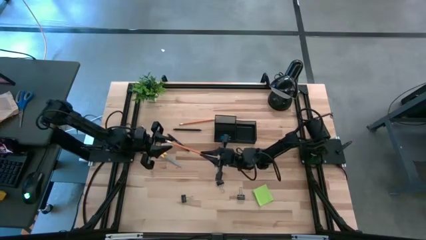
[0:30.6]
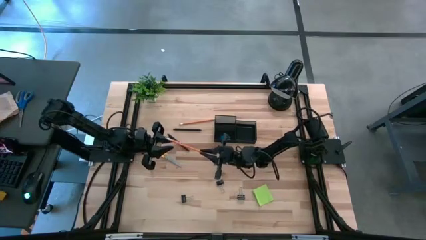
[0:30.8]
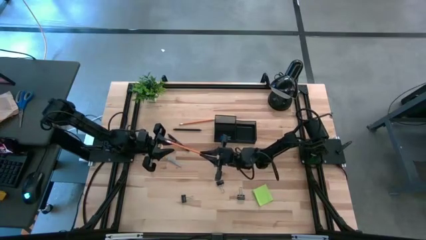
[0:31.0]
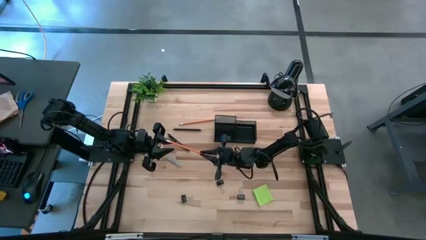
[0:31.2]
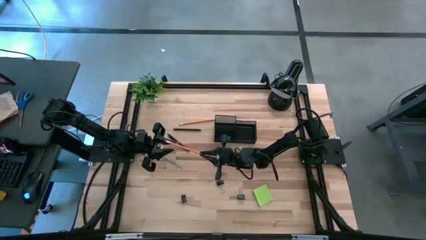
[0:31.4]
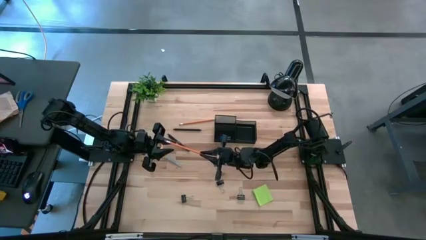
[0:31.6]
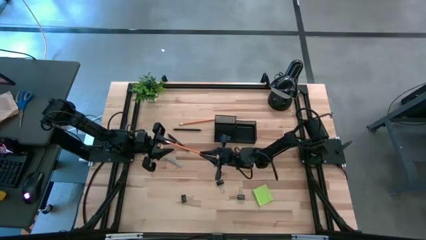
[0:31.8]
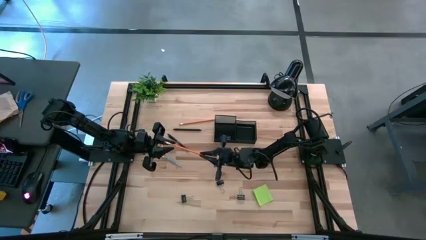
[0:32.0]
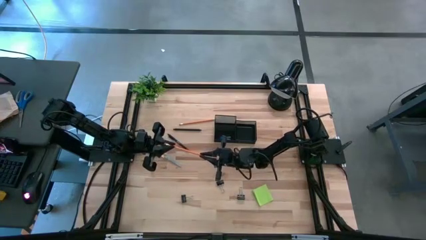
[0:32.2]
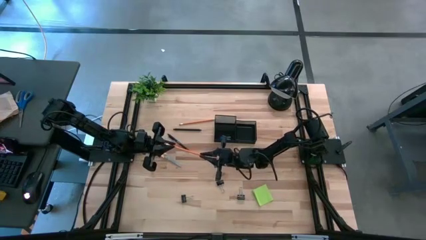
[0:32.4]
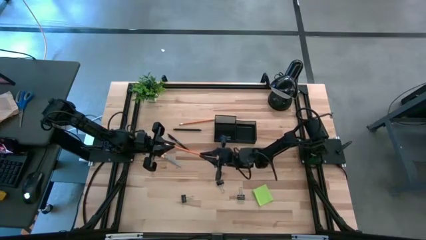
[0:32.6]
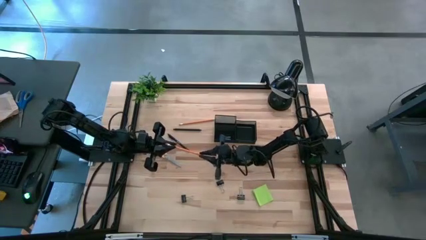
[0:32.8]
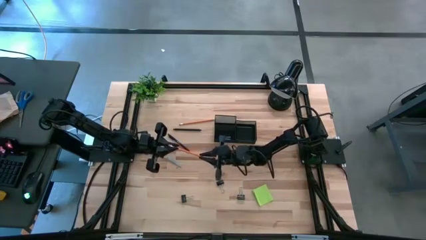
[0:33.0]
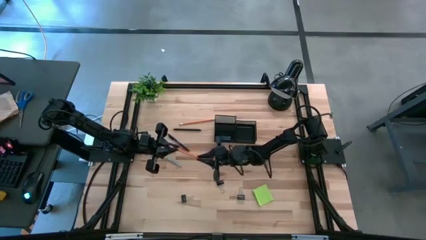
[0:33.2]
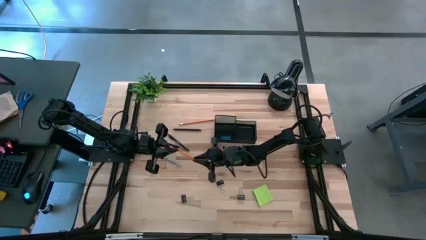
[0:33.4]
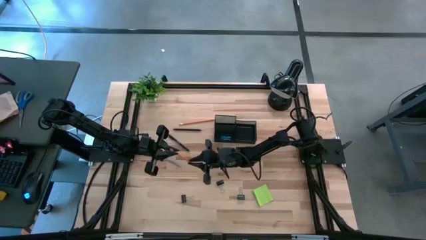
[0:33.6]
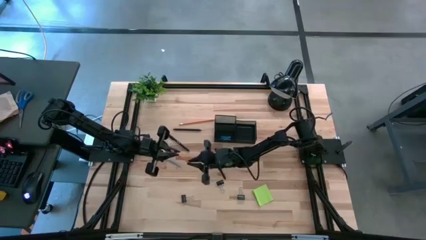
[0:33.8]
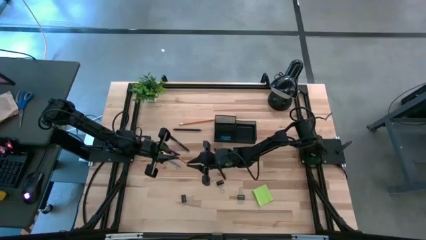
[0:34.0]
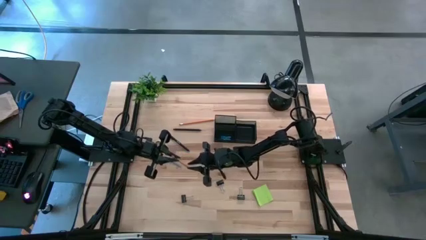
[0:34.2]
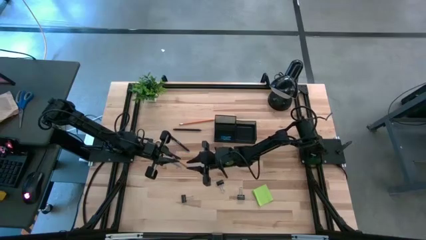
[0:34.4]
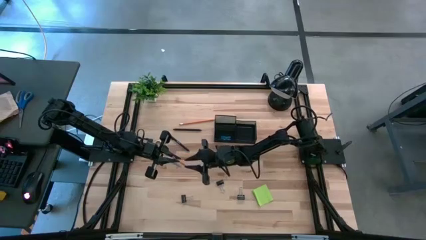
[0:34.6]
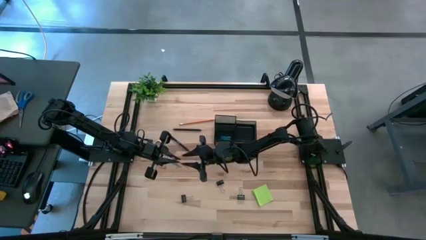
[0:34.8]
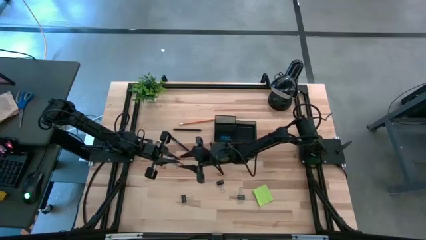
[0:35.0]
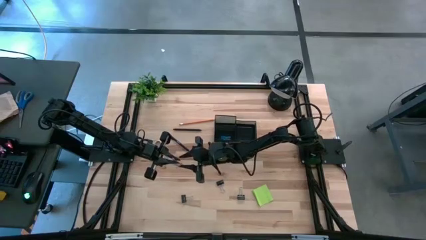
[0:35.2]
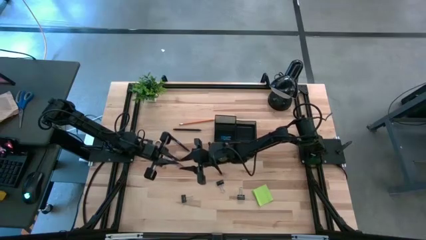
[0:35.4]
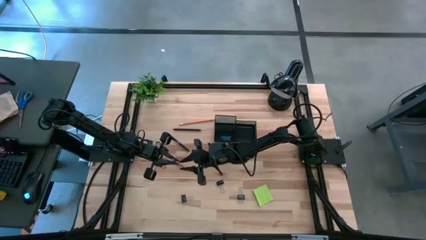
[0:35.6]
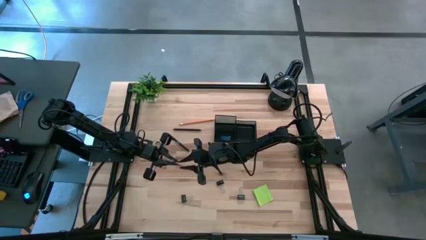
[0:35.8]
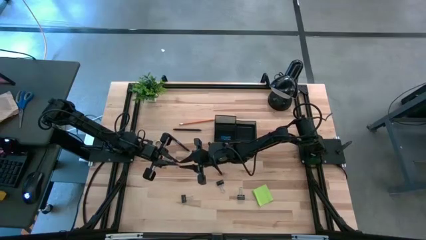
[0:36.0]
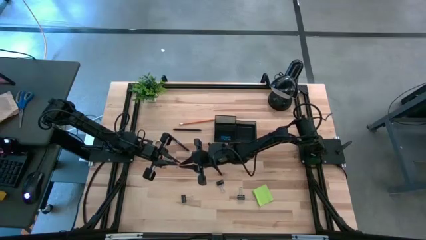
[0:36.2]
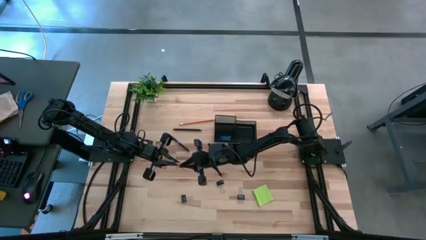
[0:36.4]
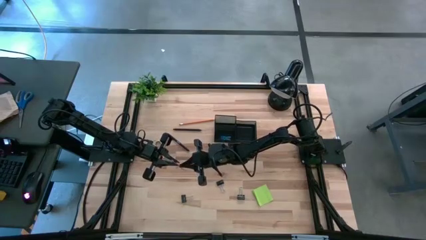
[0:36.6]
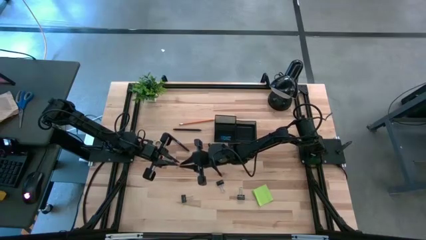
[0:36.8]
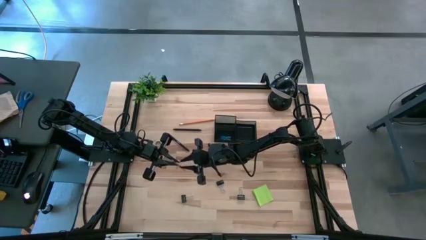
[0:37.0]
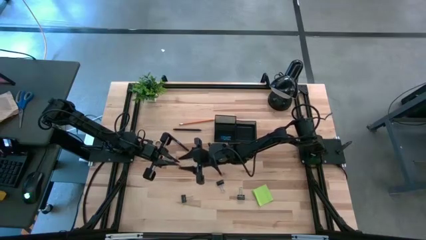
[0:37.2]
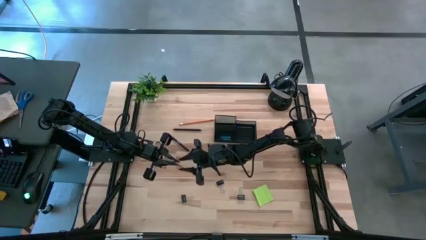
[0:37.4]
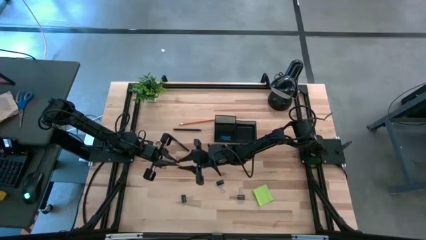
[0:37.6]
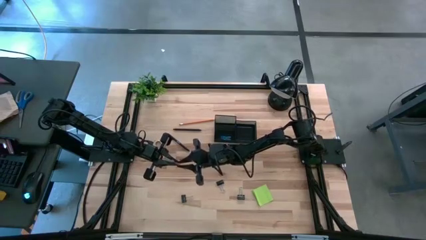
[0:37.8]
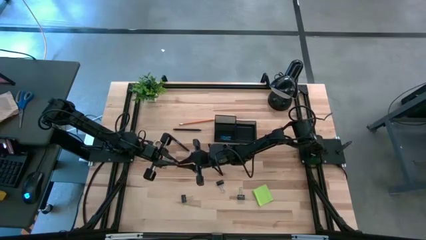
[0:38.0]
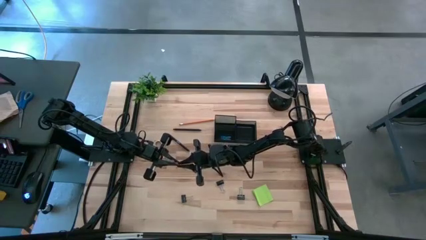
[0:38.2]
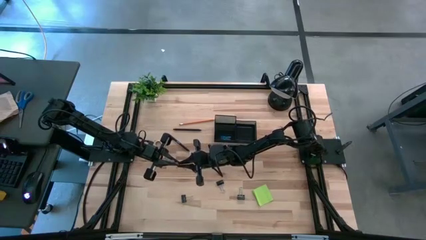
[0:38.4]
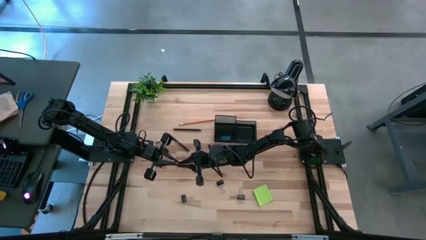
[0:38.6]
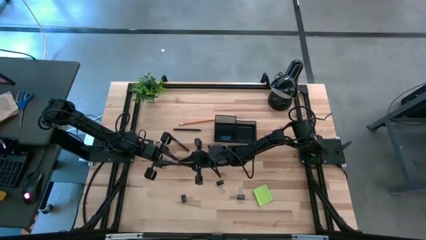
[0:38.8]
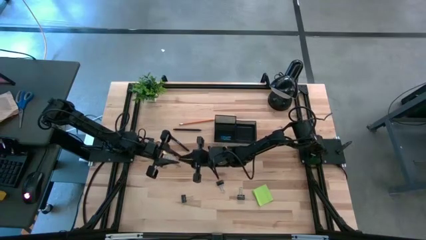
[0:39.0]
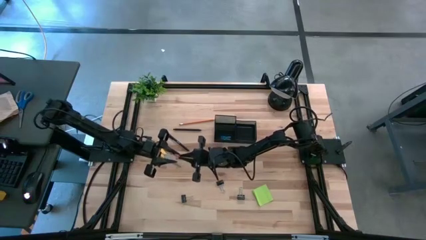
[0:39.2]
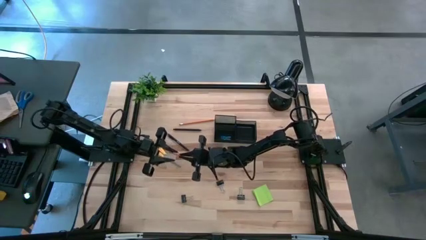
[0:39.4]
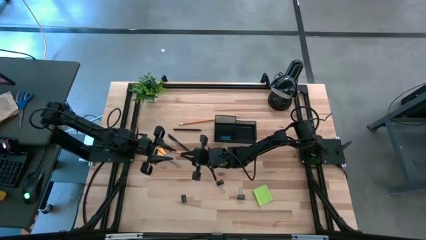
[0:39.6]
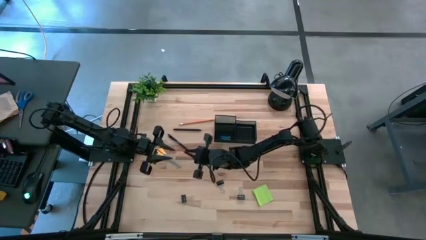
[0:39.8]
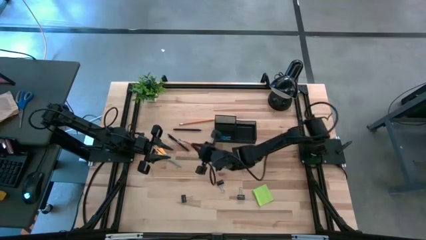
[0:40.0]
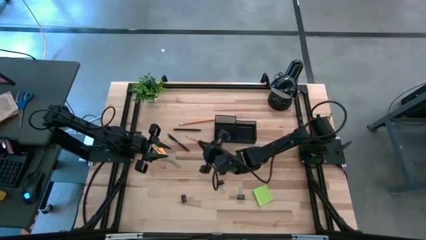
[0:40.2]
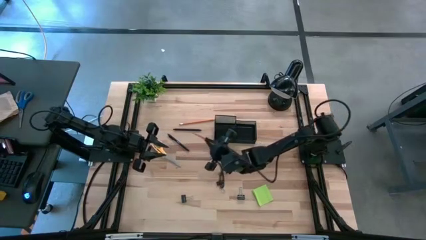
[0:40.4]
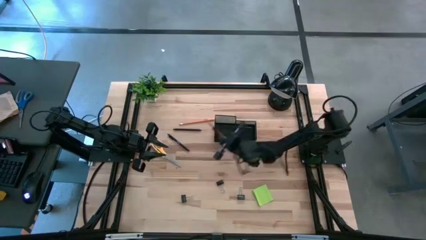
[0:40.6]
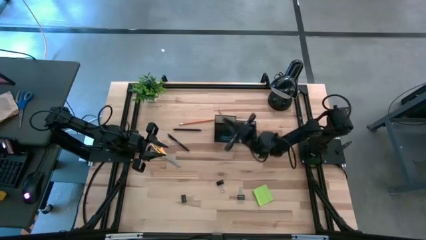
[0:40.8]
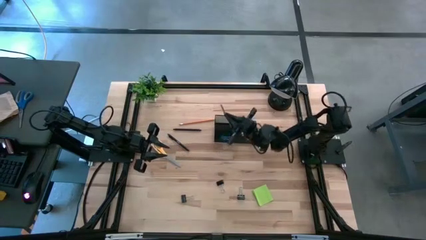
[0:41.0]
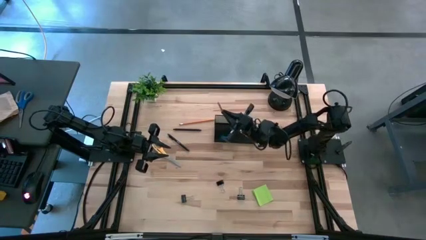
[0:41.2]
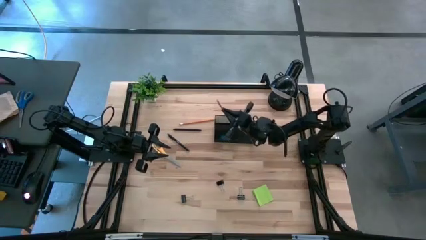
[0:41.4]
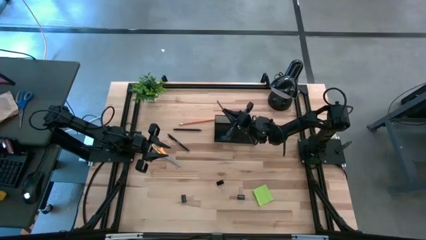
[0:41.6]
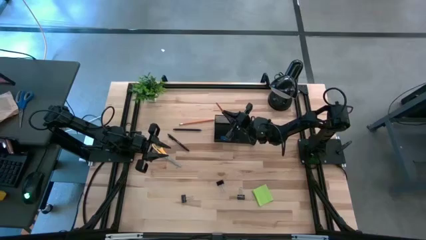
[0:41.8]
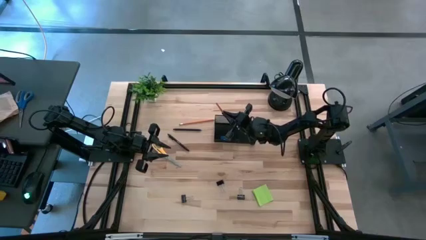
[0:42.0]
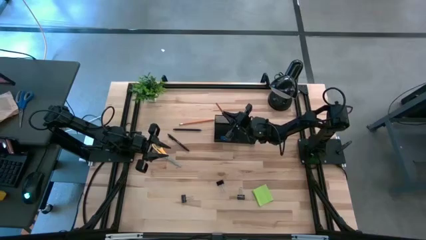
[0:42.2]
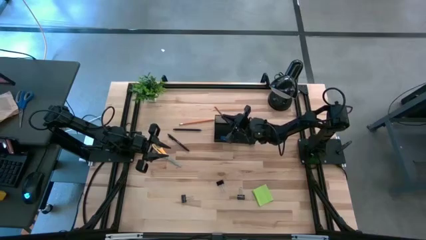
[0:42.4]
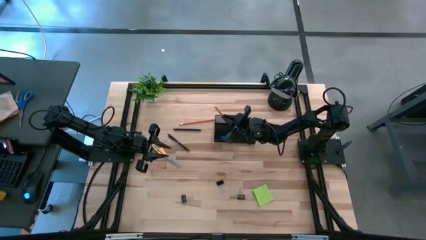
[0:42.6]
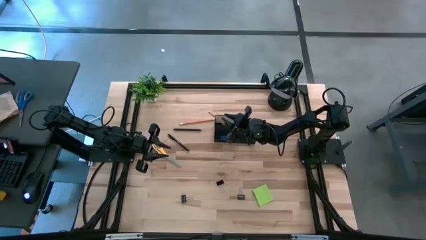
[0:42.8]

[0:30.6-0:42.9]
Task: Pick and place office supplies into organizer
Put the orange pencil into the desk organizer

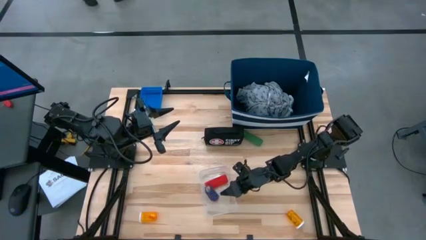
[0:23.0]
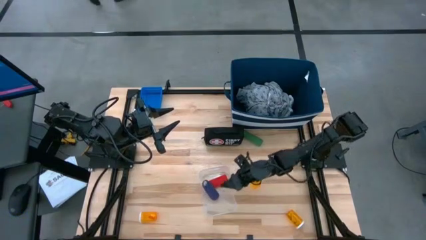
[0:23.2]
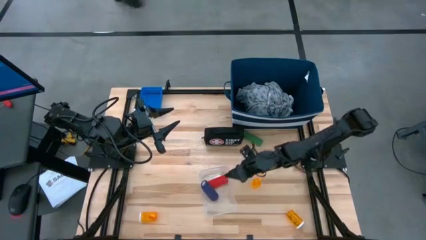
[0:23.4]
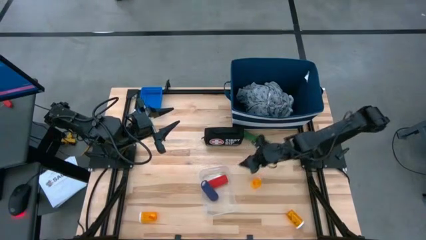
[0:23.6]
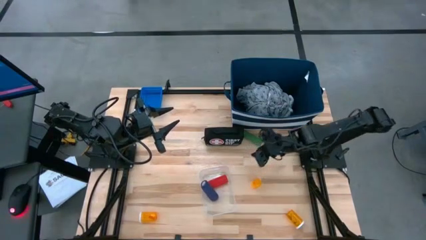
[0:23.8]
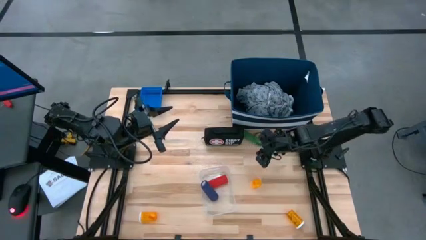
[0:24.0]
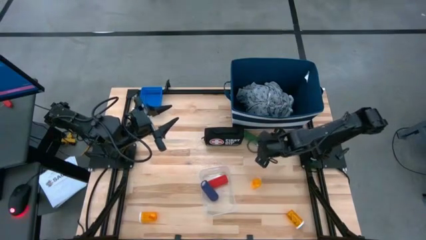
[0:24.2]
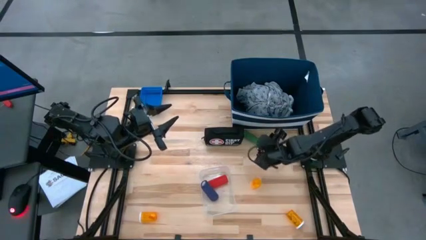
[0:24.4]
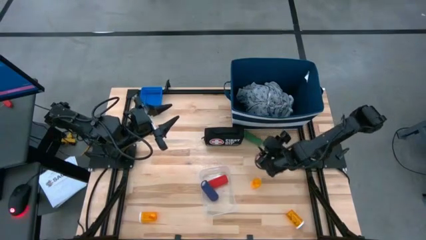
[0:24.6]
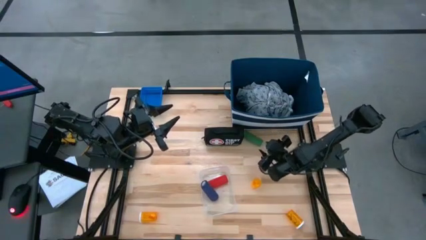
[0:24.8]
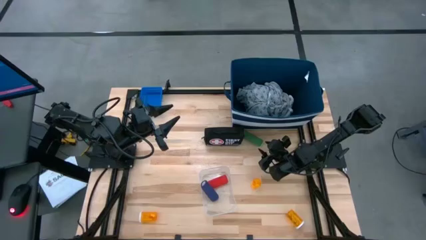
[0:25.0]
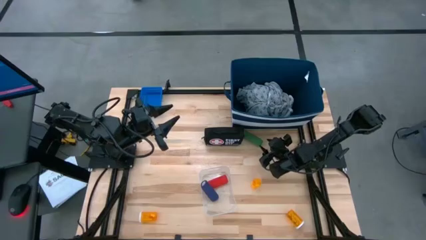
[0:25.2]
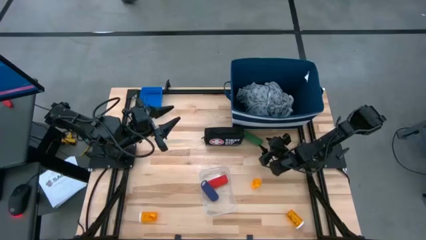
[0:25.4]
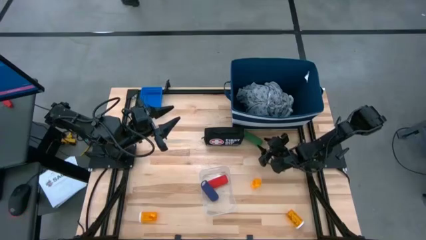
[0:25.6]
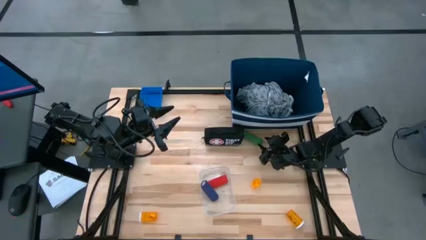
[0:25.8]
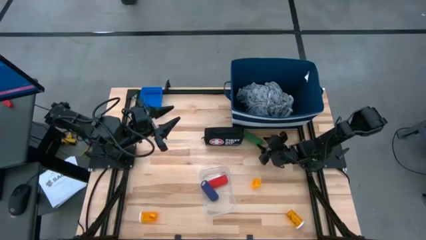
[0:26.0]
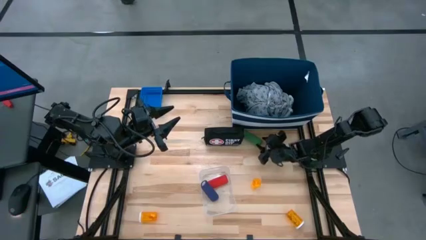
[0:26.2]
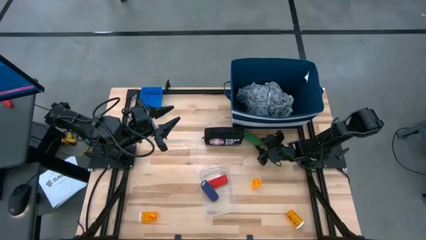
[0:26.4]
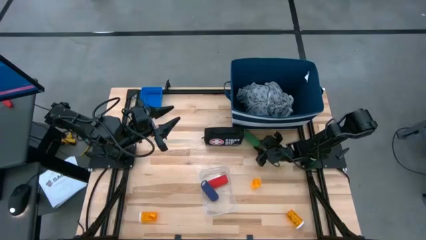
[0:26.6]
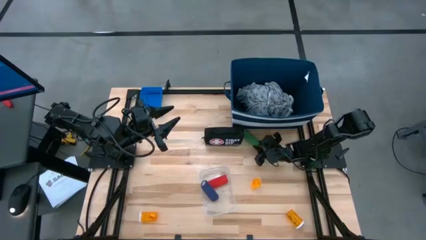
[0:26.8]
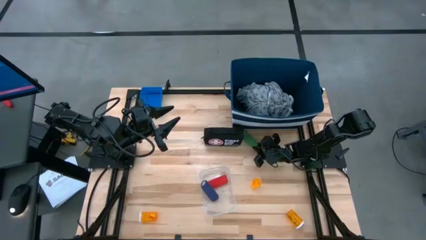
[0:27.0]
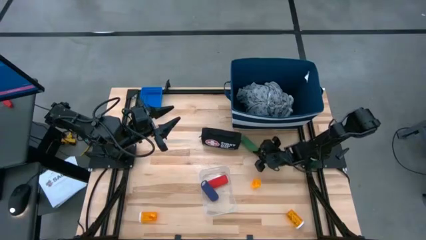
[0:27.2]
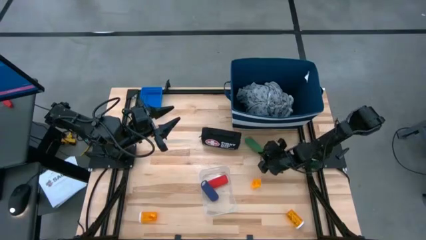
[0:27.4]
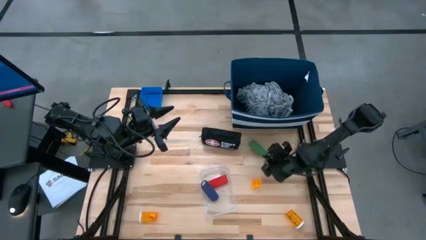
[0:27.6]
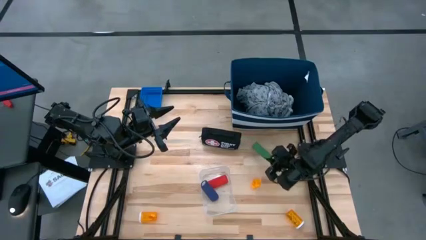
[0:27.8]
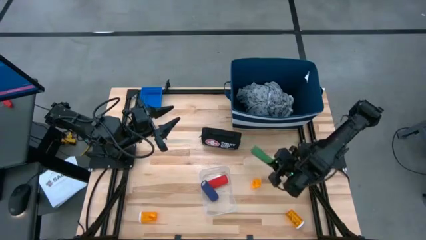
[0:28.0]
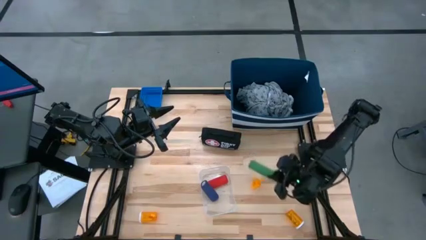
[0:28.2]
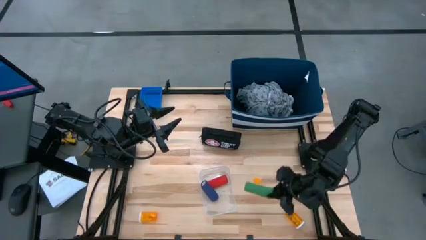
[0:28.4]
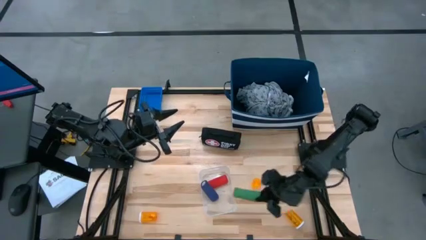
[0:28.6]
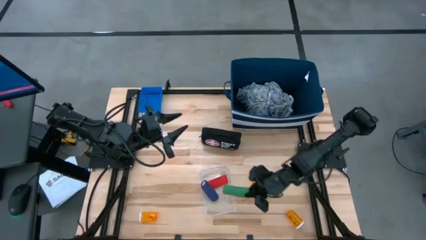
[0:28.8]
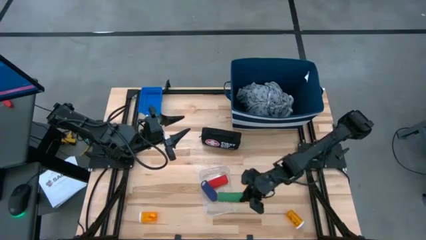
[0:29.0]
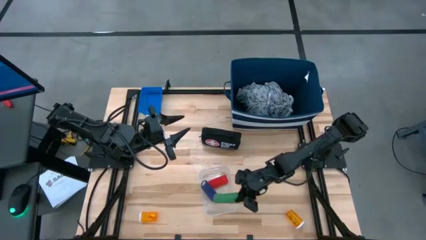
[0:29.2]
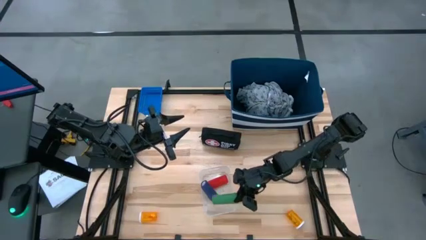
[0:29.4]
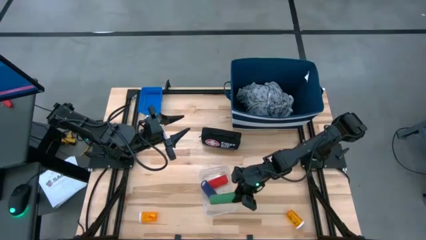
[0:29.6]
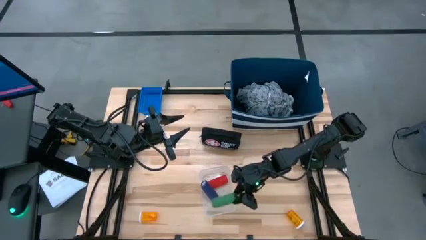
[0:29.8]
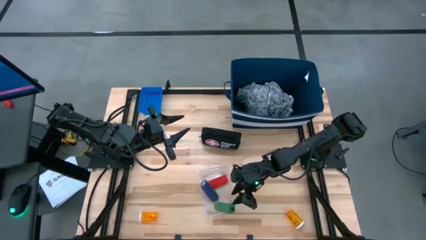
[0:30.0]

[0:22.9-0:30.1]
Task: Pick & place medical supplies in basket/bin
Put the green bandage into the transparent bin
